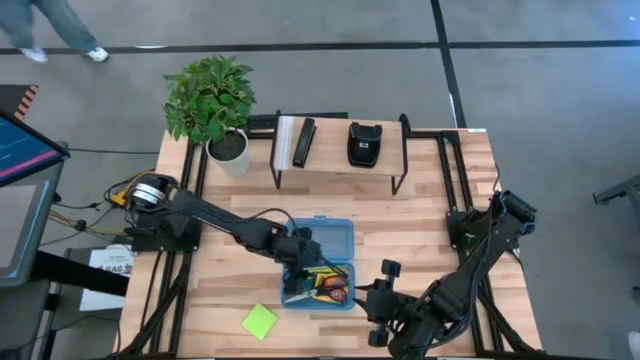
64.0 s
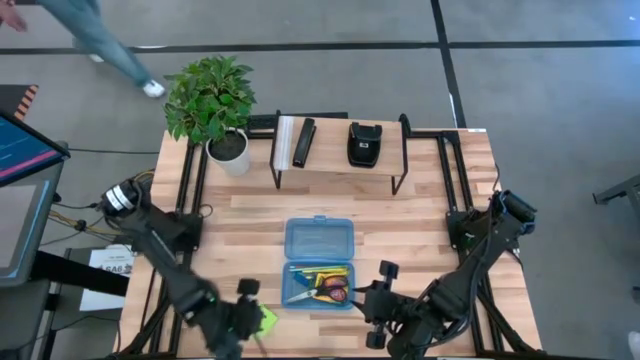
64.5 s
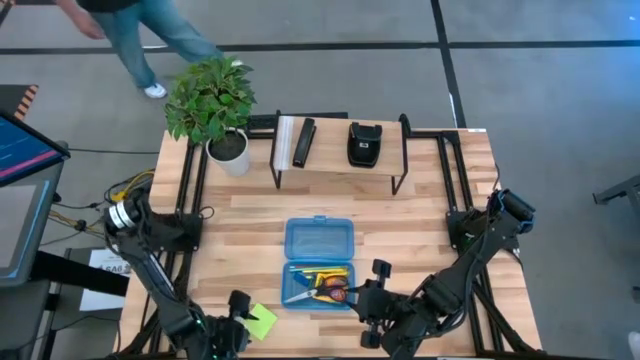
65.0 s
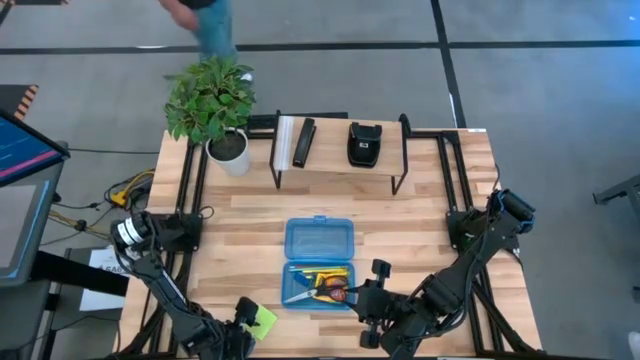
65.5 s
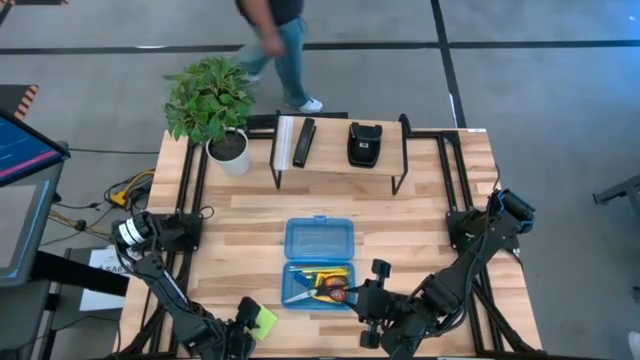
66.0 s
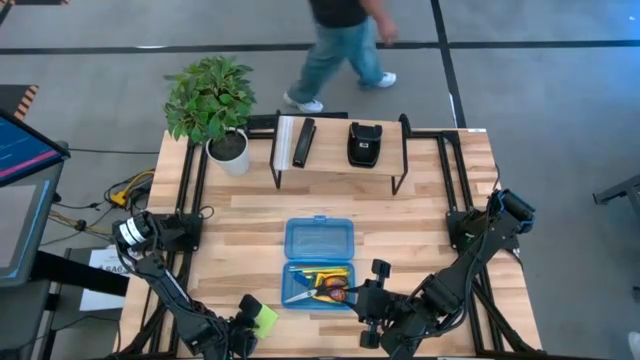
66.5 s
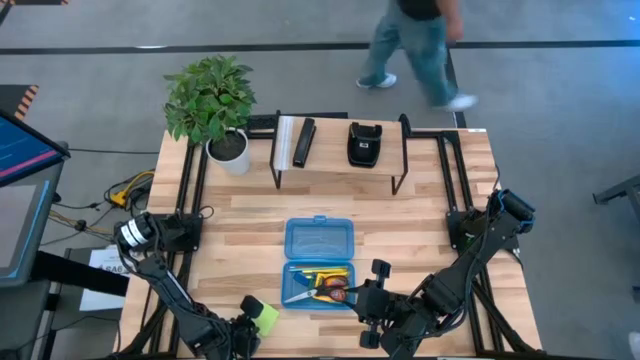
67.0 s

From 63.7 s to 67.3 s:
Task: Pack school essentials
Put the green sticky note into the blue supply box

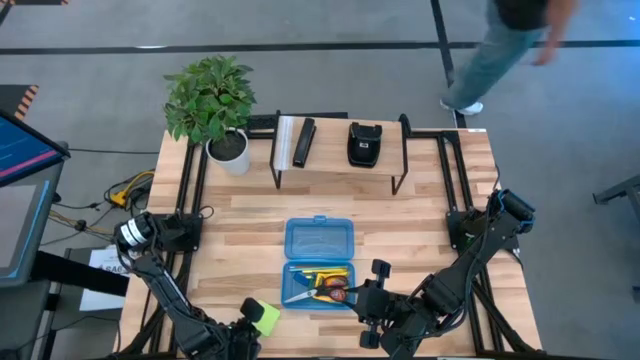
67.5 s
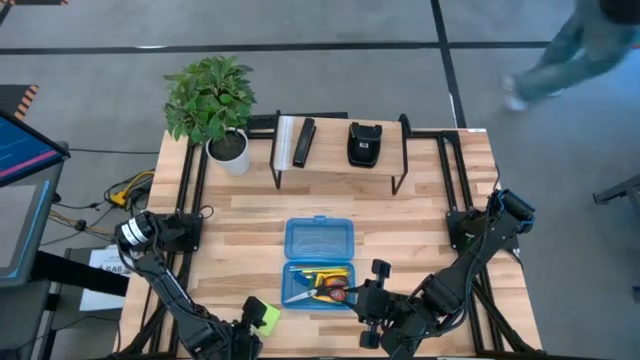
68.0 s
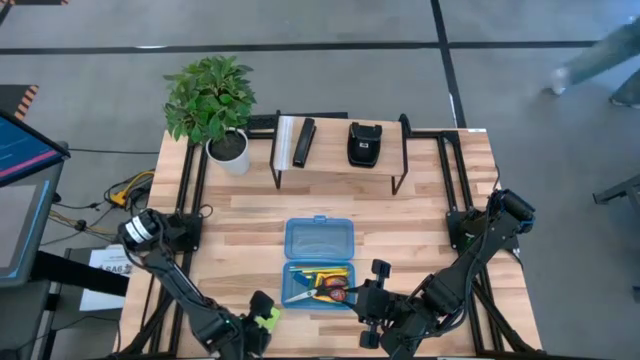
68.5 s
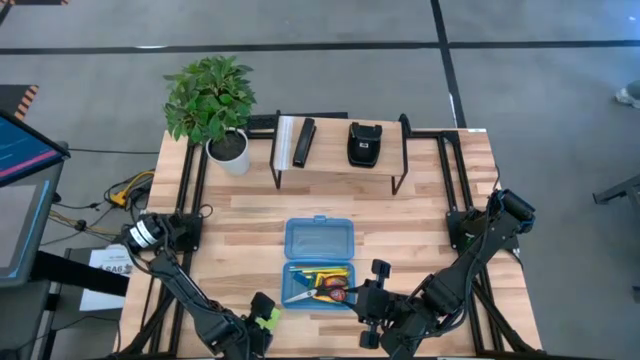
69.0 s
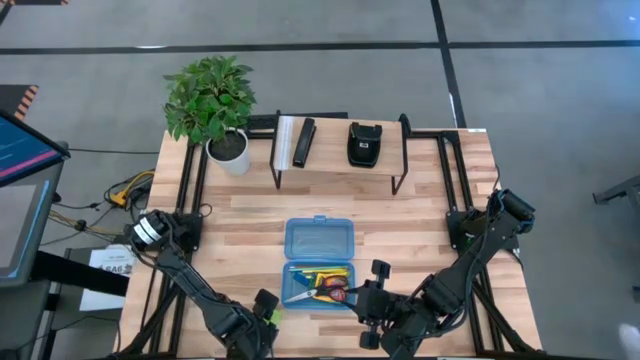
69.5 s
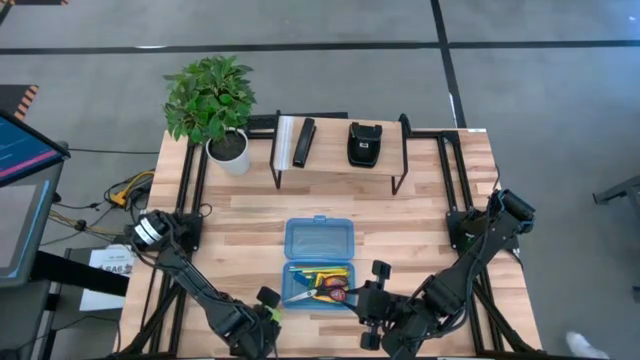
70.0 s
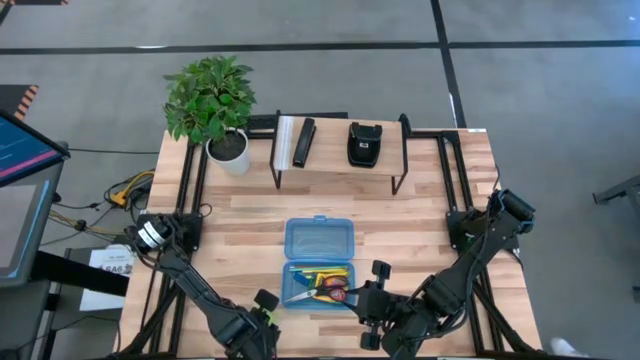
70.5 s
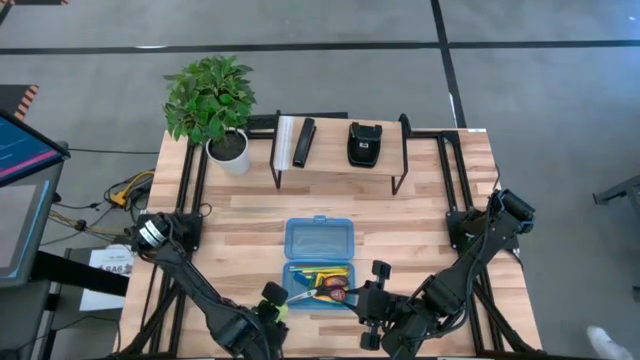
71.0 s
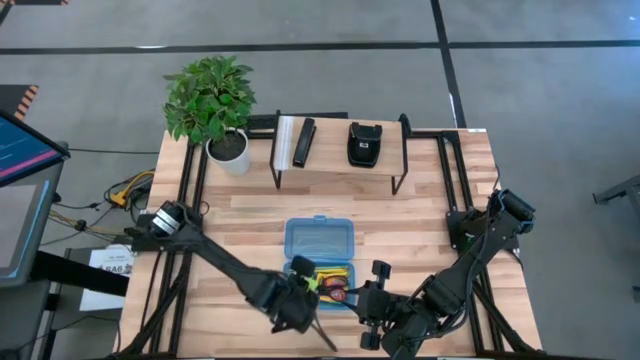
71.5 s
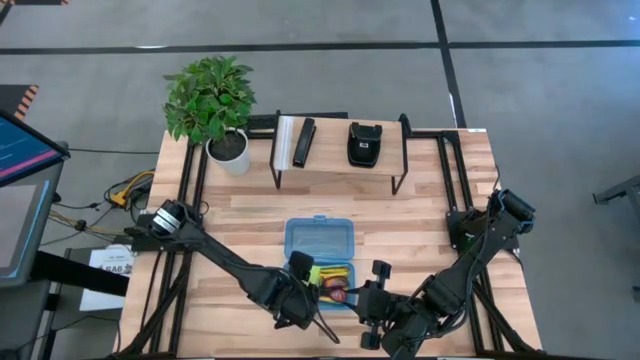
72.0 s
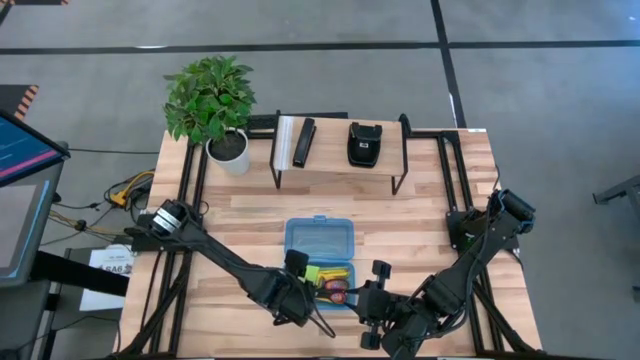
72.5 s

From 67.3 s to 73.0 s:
Put the green sticky note into the blue supply box

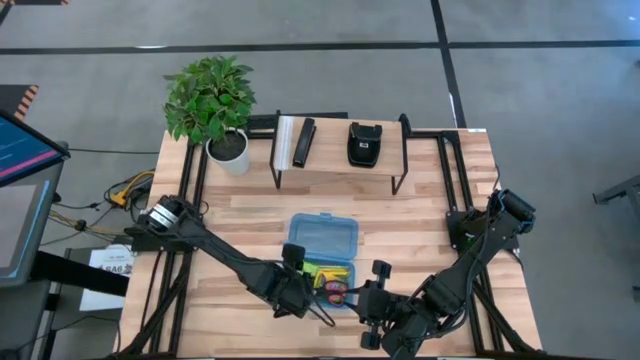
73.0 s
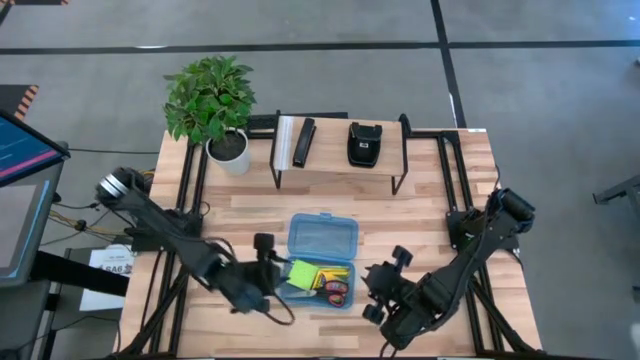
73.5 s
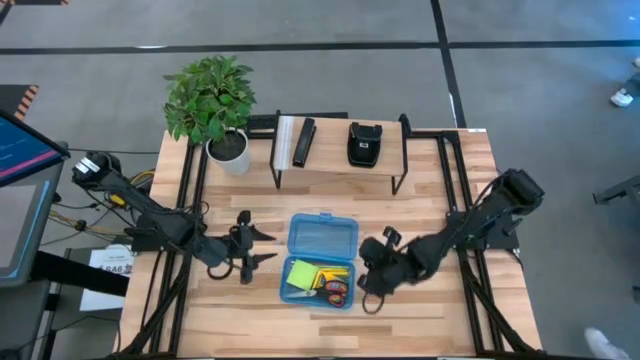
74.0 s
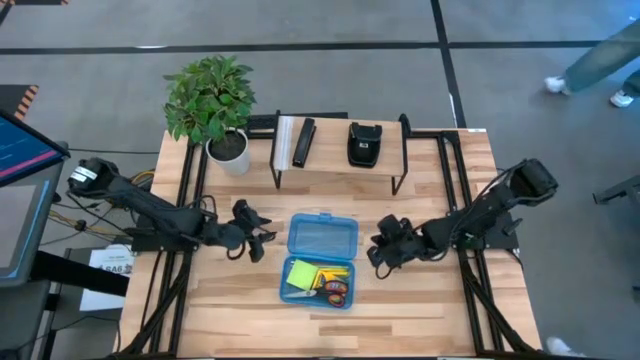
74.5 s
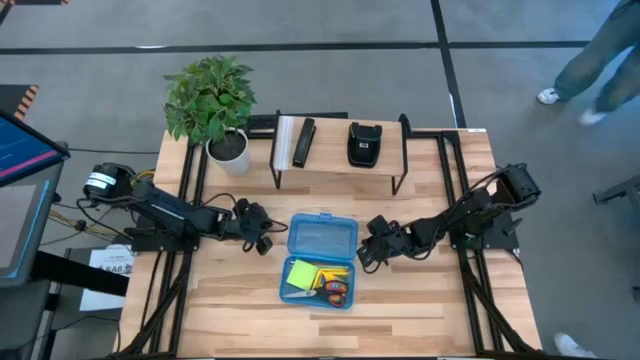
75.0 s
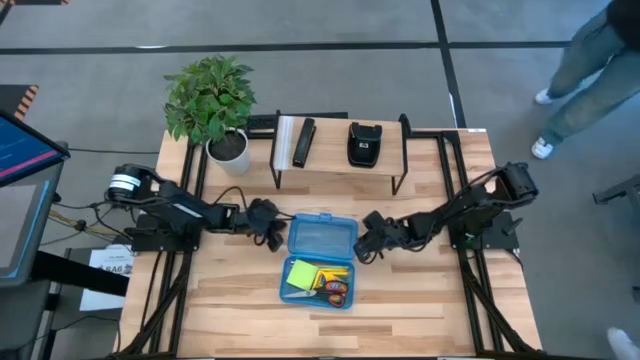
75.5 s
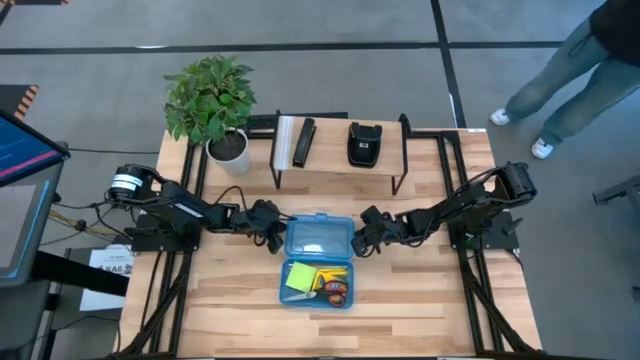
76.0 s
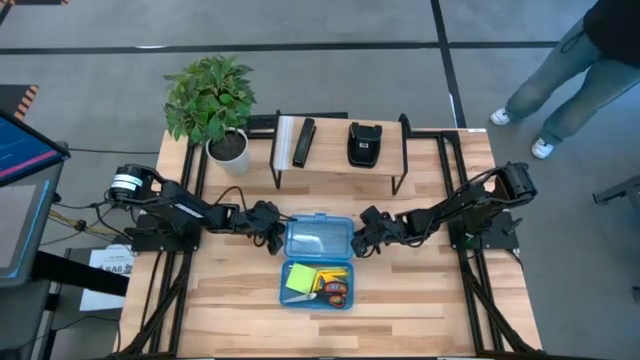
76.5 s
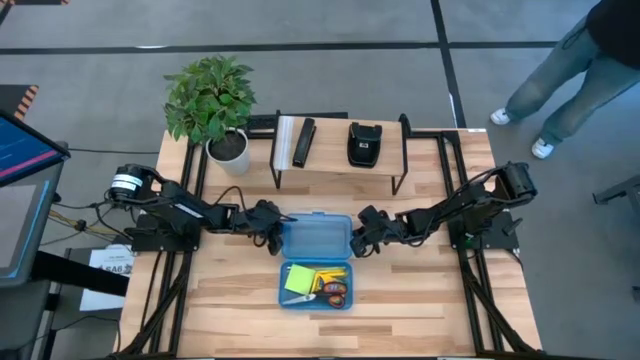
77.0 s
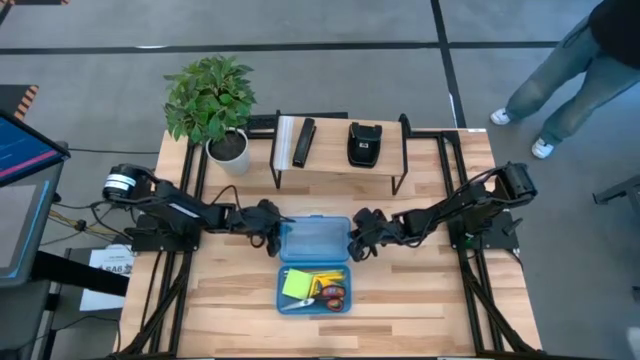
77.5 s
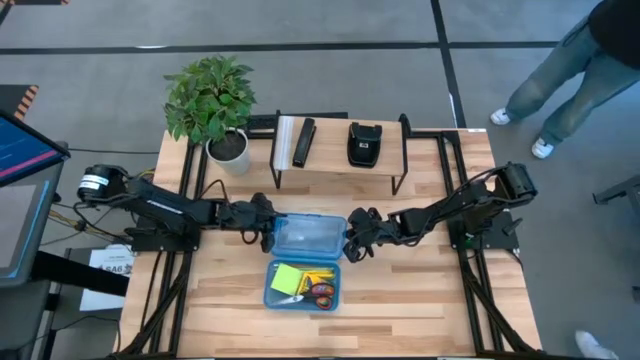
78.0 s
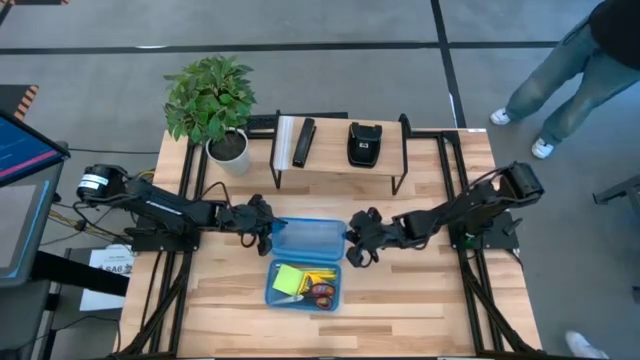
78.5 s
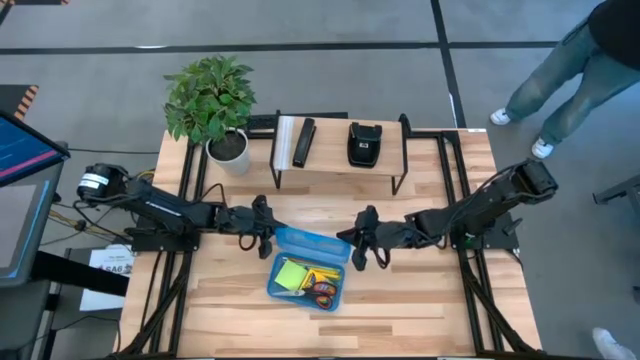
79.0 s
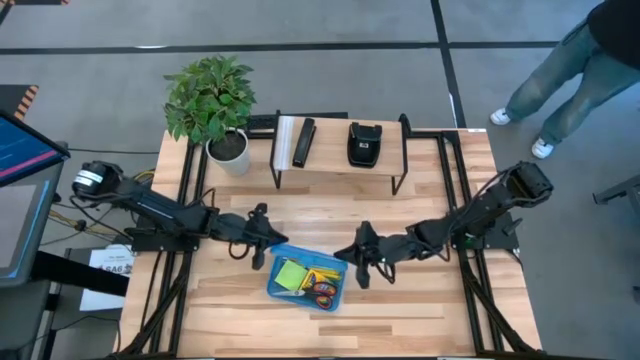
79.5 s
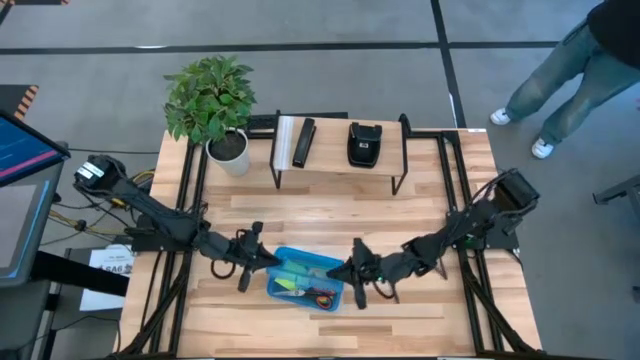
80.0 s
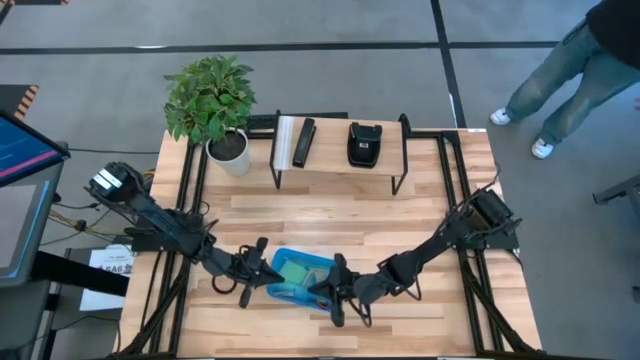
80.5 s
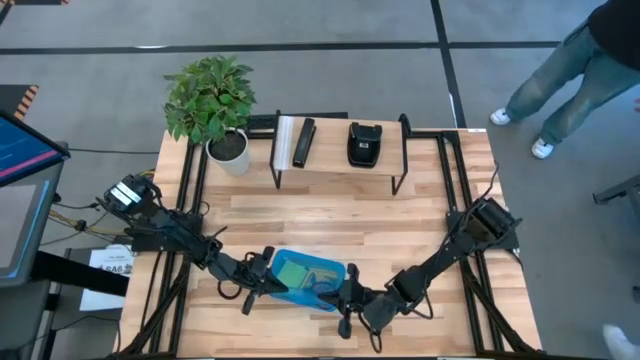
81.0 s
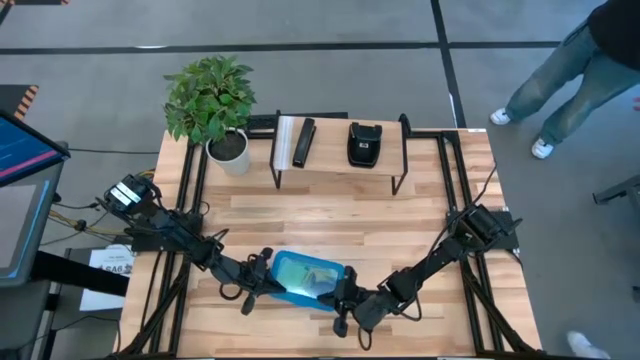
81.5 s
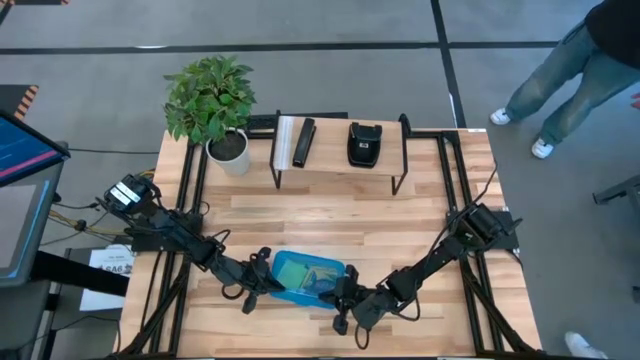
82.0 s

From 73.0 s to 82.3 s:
Close the blue supply box

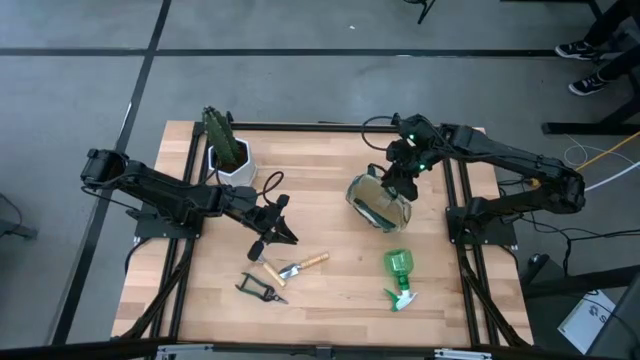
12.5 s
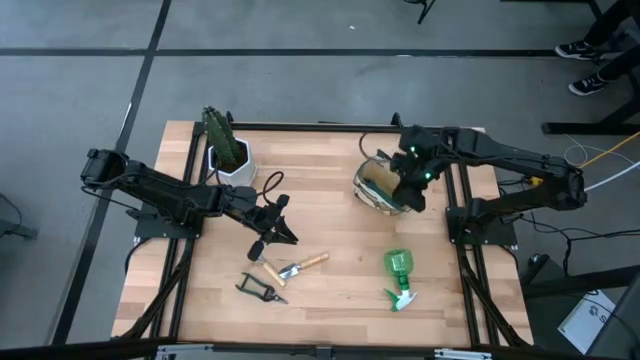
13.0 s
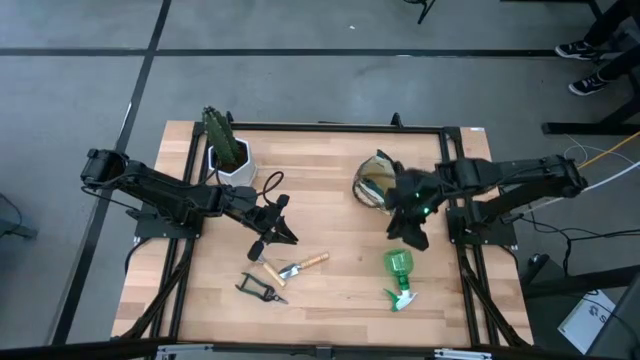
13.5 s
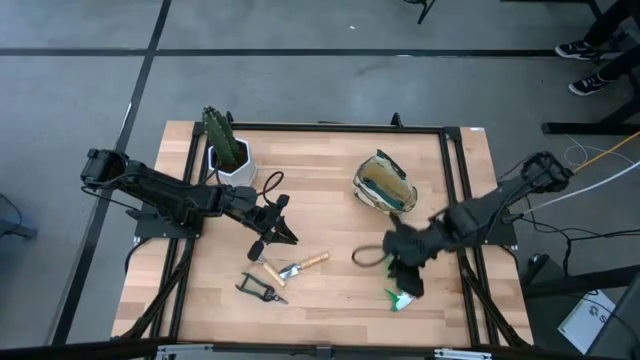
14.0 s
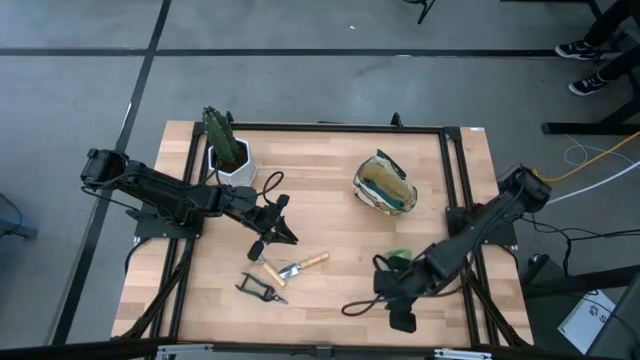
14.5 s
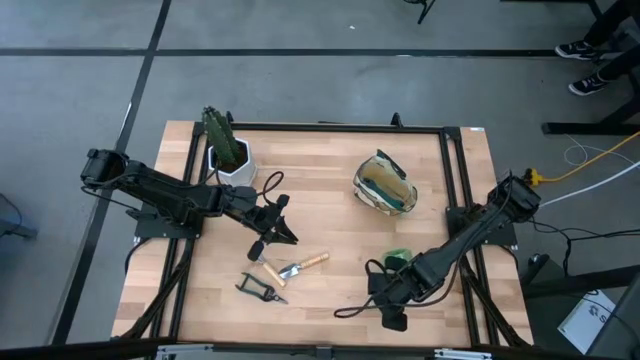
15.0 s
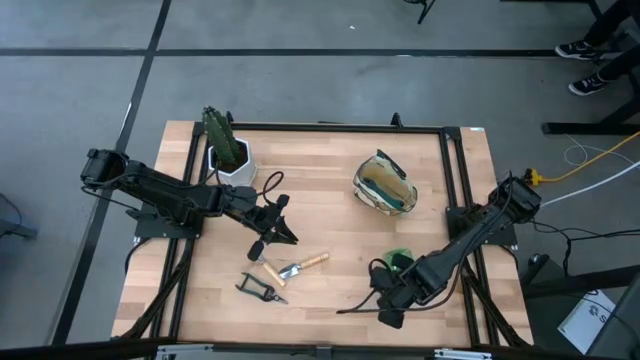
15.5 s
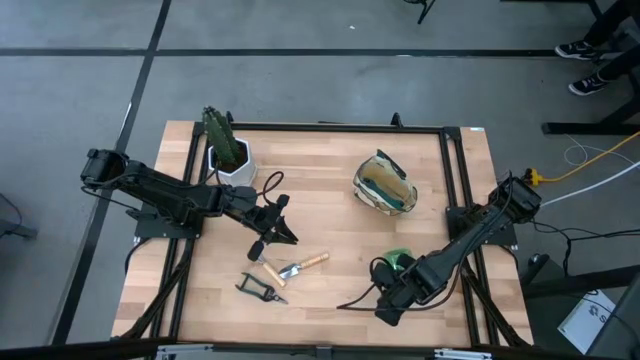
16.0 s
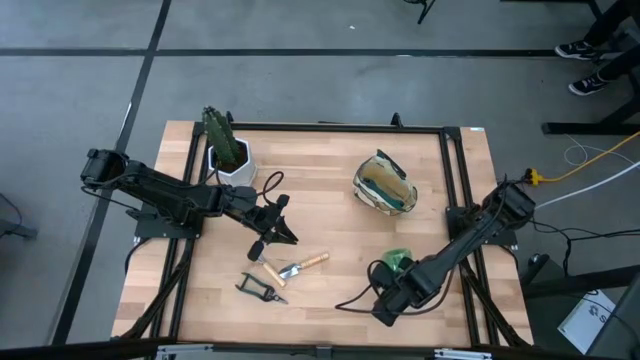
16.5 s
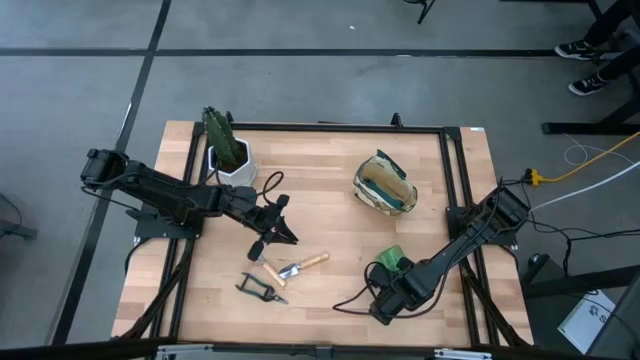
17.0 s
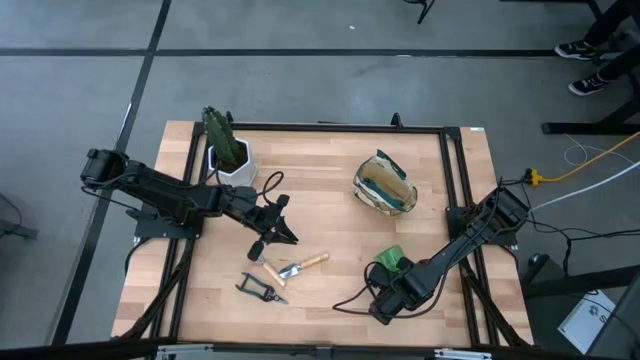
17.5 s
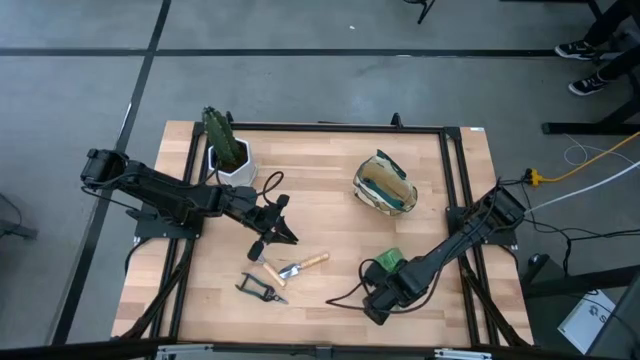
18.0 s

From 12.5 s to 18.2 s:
Task: Pick & Place Garden tools in Gardening bag
Put the spray bottle into the gardening bag
